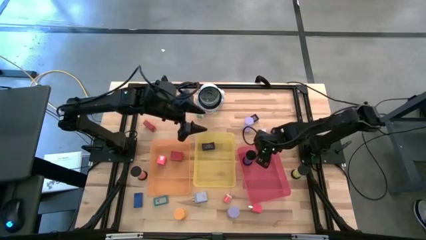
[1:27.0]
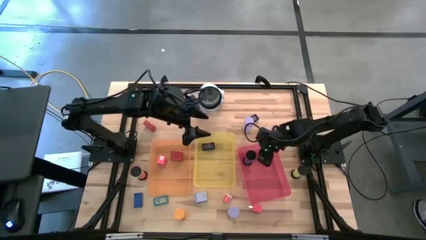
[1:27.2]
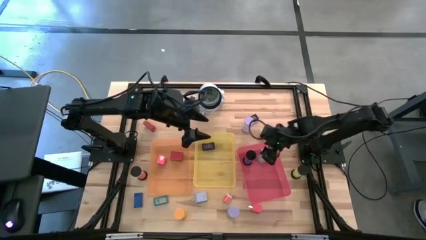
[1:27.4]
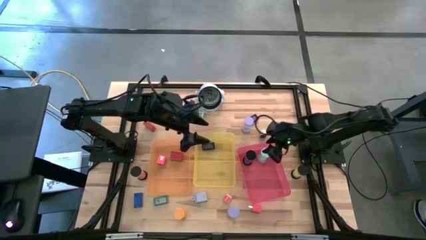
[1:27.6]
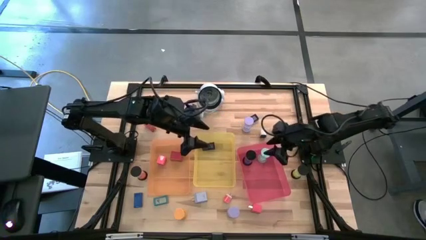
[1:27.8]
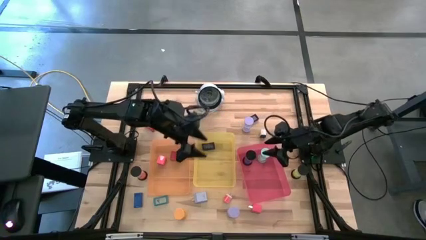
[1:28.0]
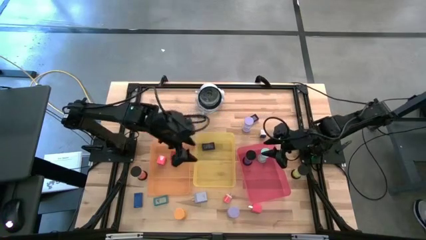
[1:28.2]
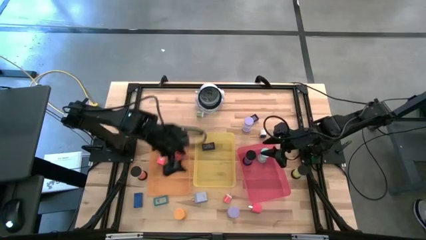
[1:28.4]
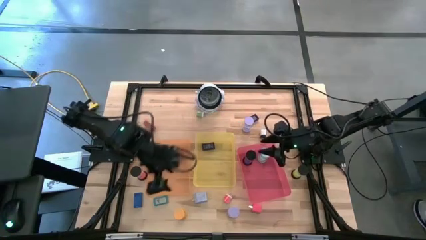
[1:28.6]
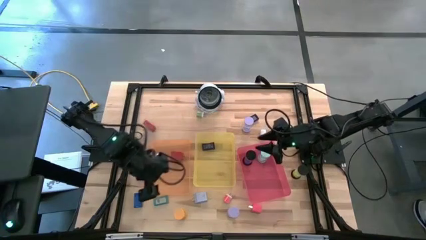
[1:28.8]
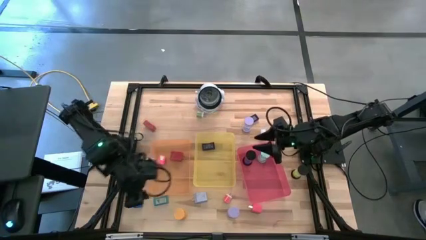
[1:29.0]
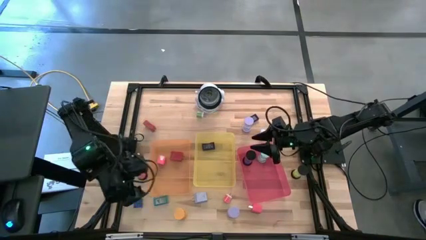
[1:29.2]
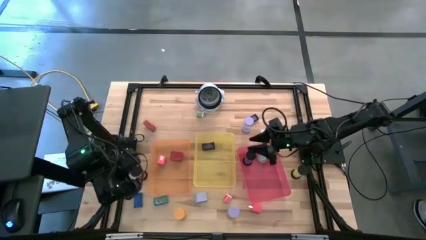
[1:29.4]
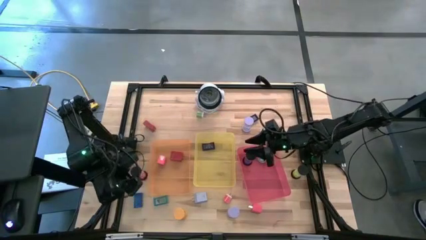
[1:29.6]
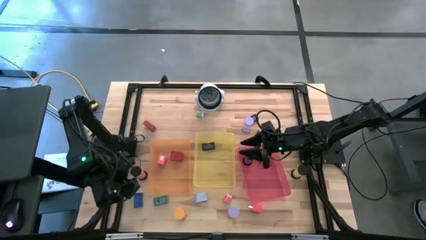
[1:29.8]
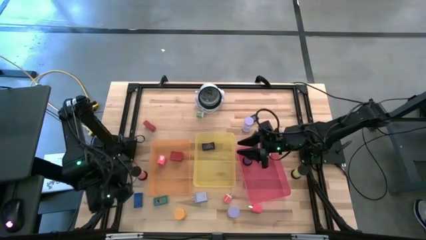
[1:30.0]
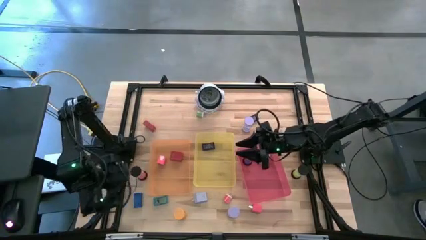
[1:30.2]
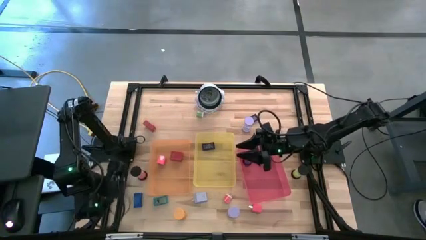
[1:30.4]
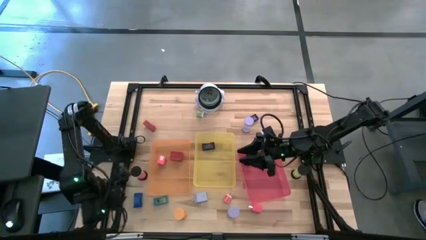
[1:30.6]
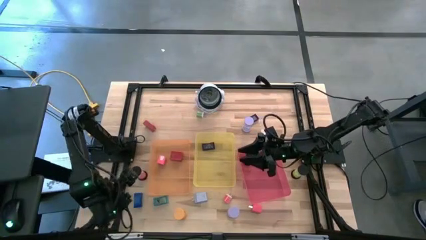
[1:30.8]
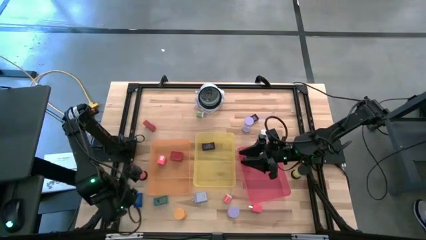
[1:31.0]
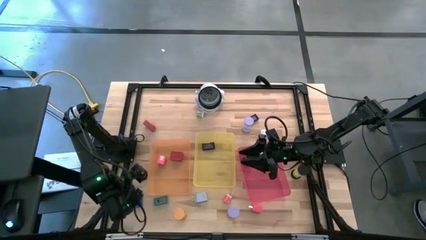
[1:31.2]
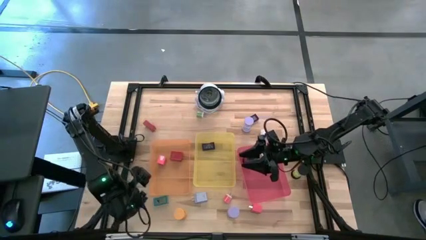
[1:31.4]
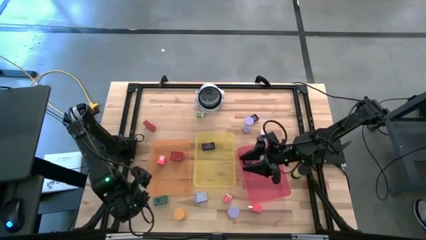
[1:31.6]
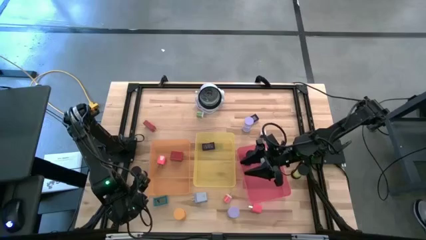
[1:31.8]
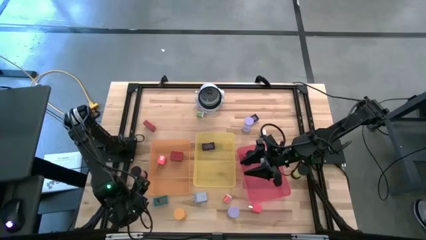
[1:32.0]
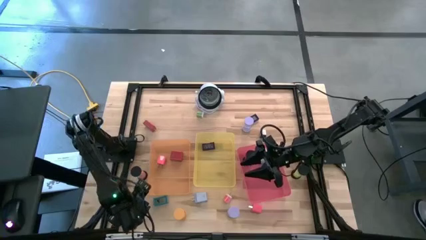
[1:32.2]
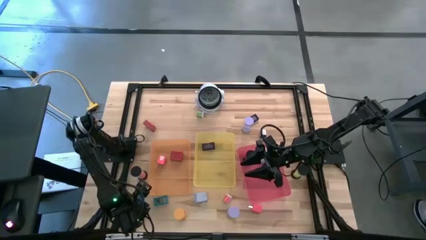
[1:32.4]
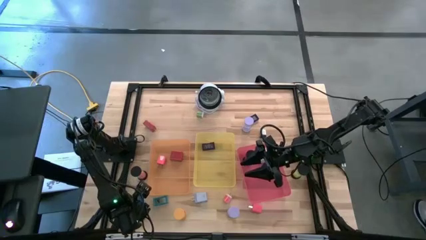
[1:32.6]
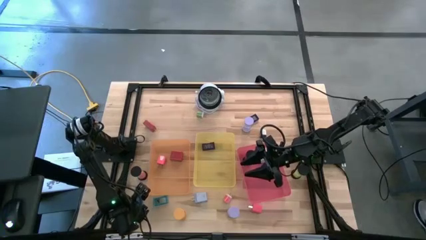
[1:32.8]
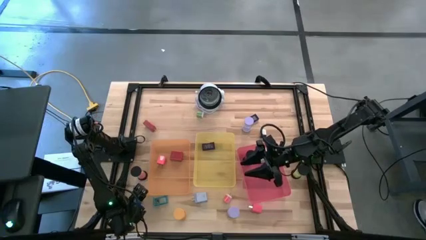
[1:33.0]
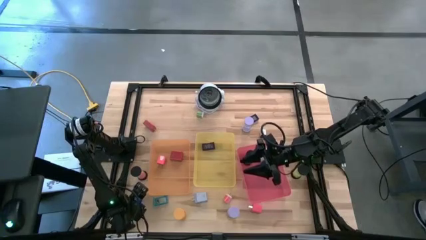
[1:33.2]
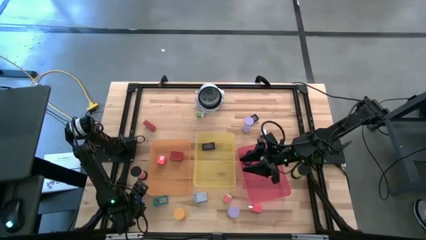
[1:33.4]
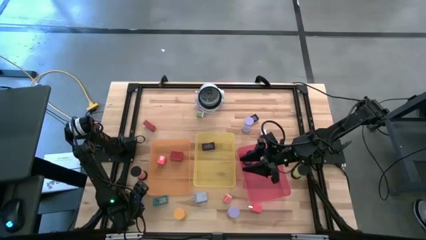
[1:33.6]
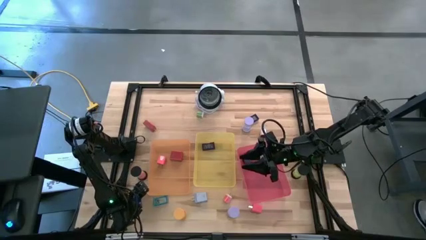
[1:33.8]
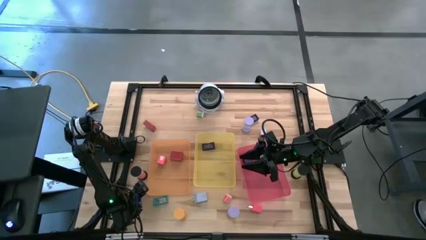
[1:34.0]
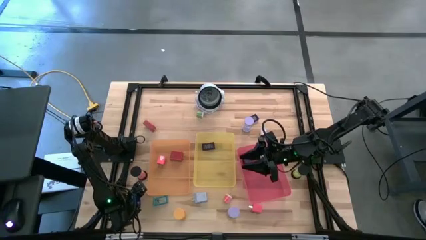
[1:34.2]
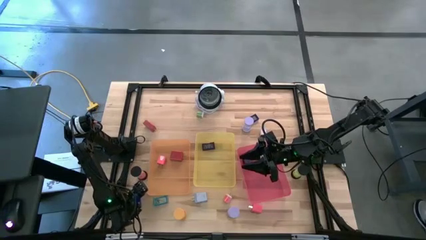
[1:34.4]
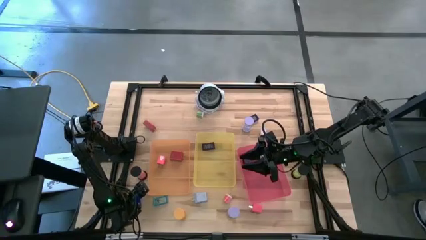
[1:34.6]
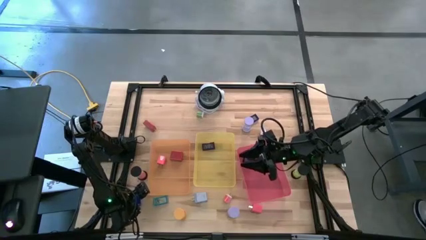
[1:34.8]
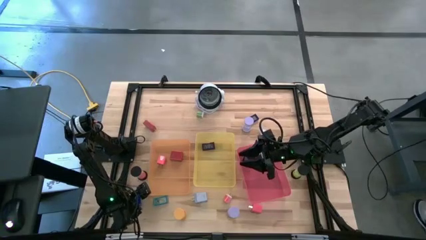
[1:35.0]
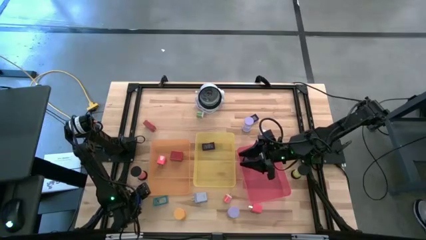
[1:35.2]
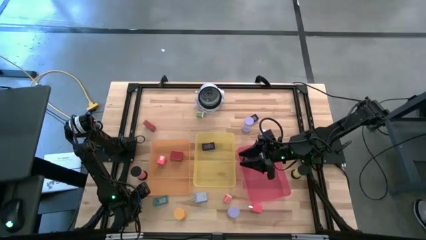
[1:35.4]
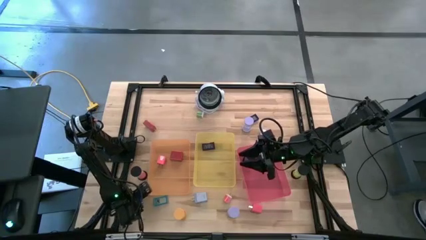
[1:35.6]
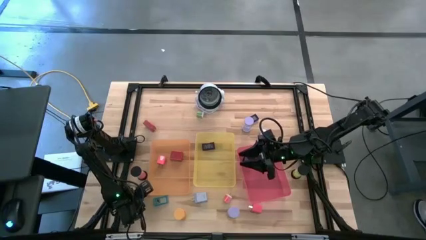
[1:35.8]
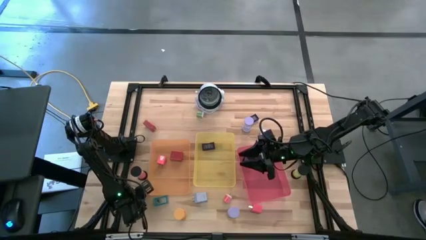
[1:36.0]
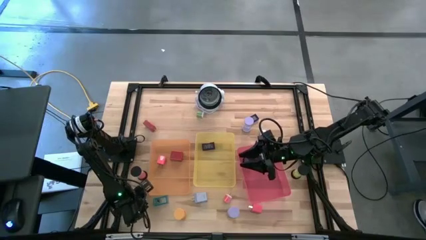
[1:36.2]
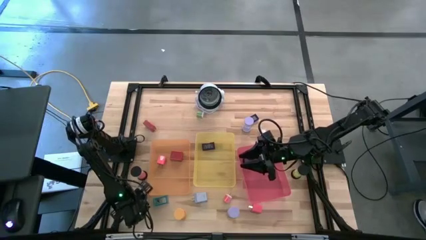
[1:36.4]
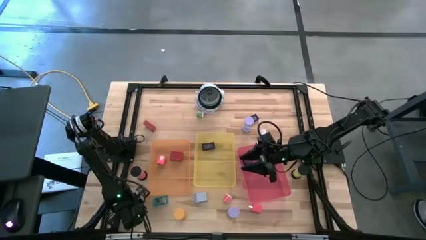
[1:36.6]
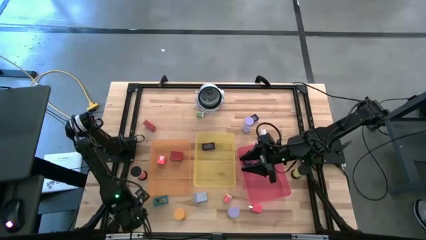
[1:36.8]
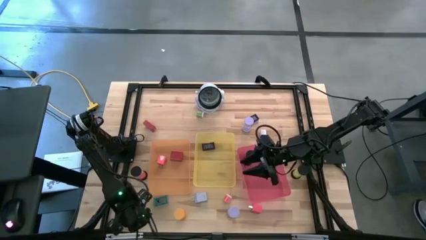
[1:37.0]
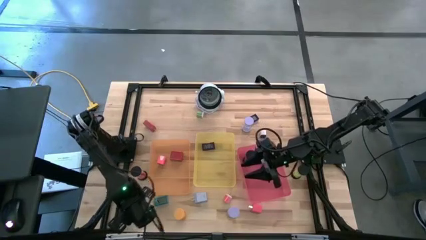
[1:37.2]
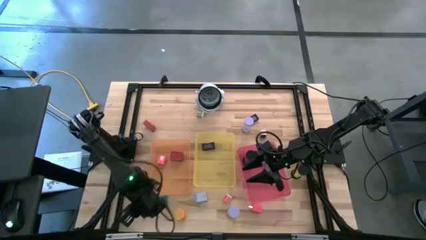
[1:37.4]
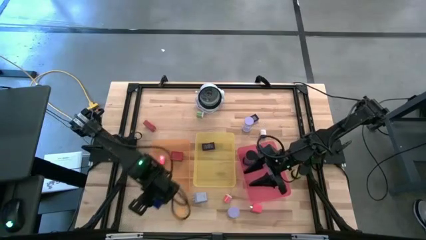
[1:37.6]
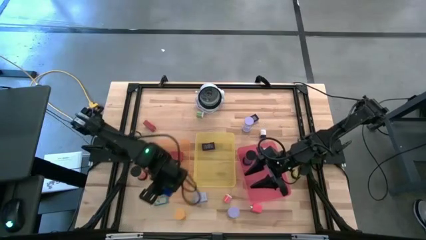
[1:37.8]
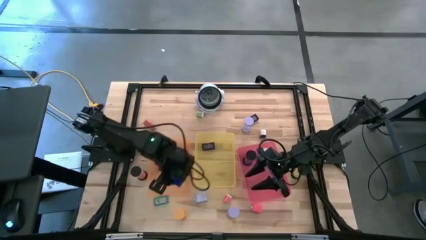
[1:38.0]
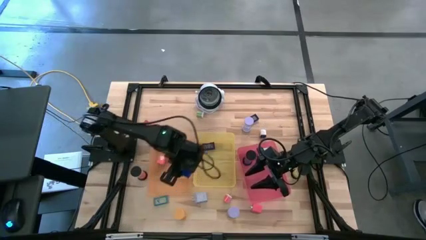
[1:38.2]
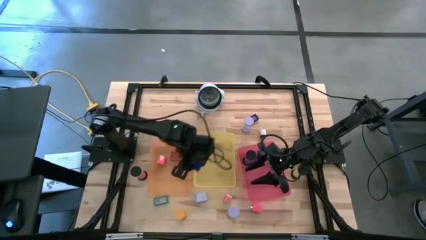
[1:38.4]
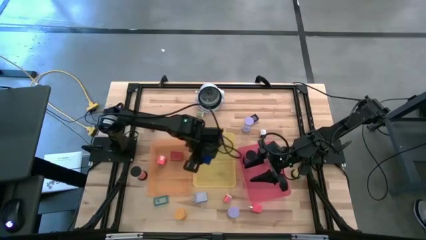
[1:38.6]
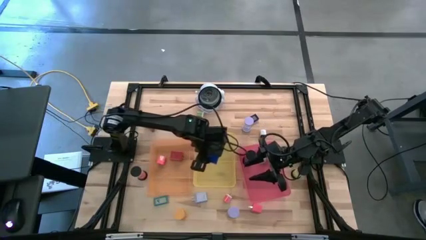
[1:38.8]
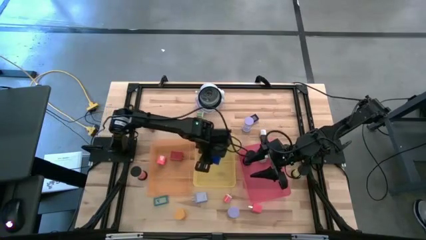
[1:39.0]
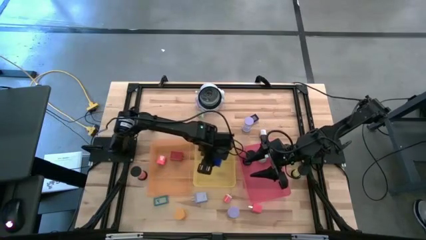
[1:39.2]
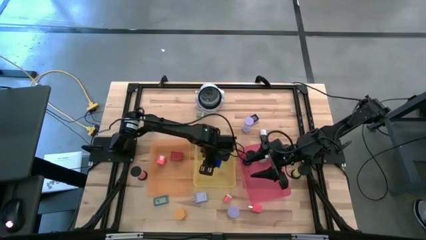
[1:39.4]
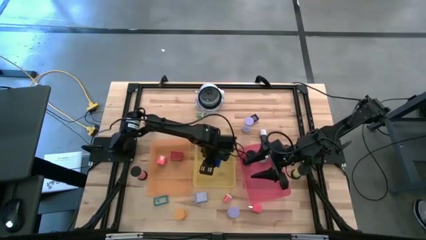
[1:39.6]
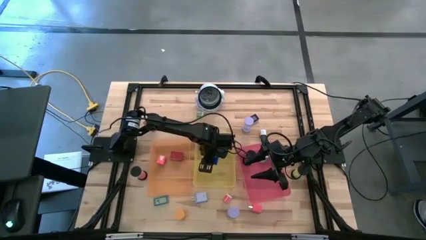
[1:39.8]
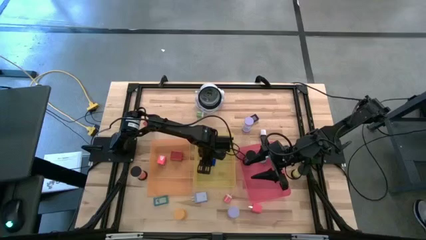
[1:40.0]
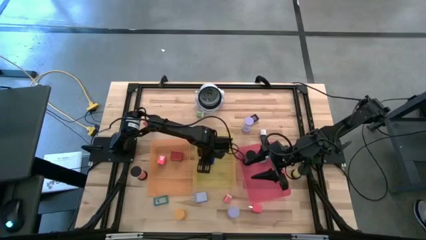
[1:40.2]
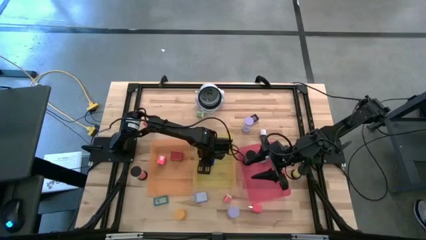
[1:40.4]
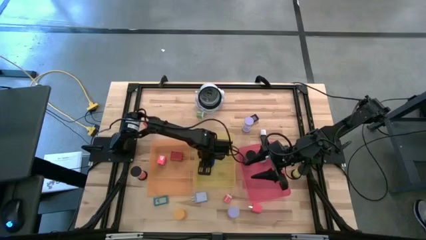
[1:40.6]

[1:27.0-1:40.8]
Task: Pick & Place Office items
Put the blue digital timer into the yellow bin
